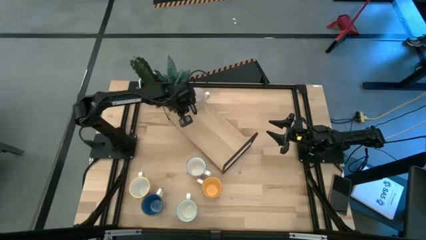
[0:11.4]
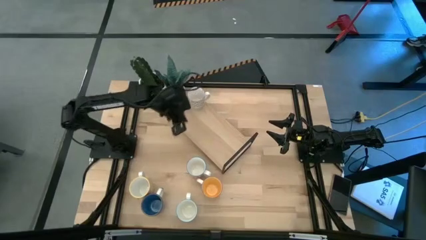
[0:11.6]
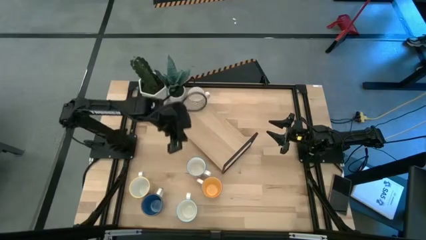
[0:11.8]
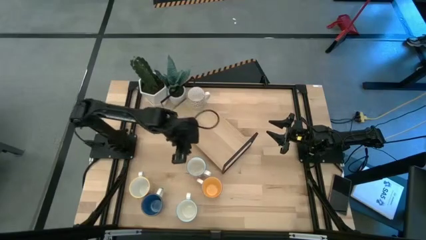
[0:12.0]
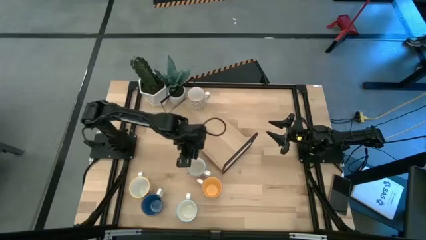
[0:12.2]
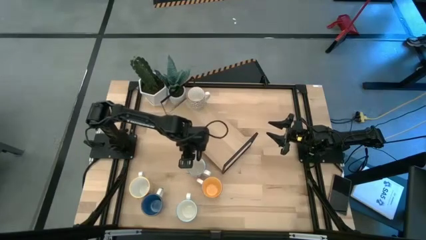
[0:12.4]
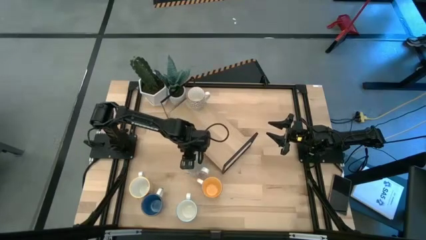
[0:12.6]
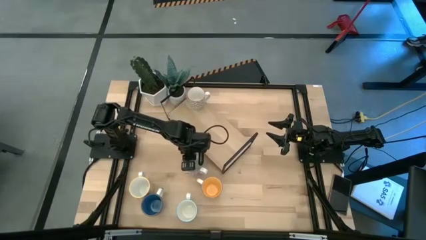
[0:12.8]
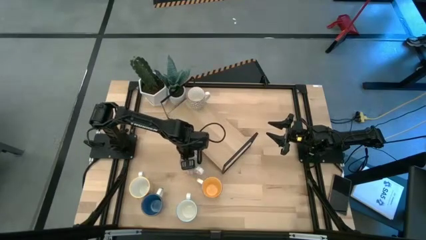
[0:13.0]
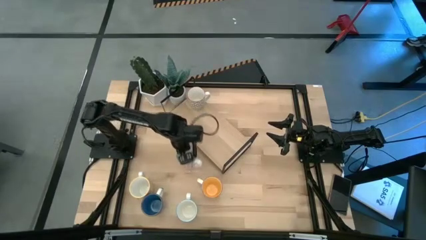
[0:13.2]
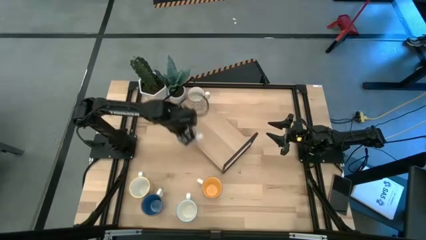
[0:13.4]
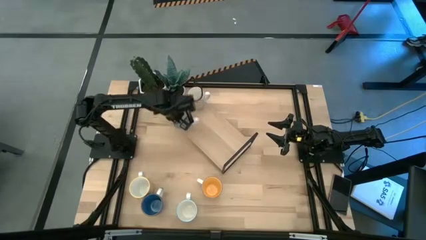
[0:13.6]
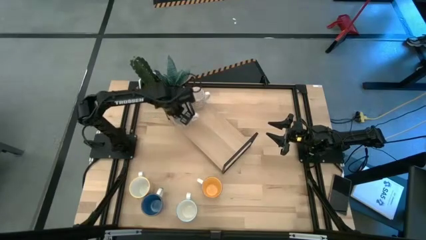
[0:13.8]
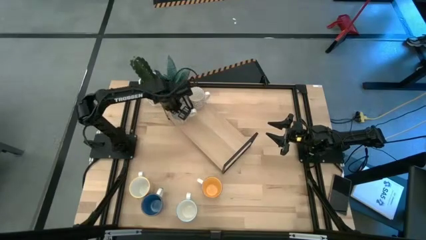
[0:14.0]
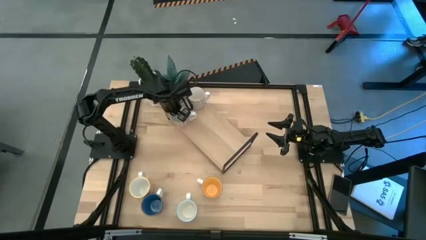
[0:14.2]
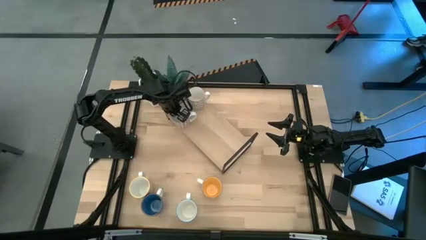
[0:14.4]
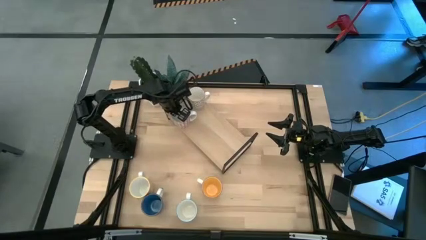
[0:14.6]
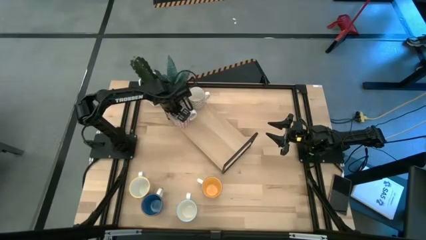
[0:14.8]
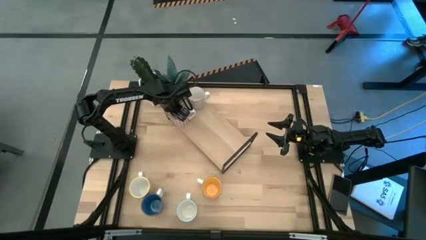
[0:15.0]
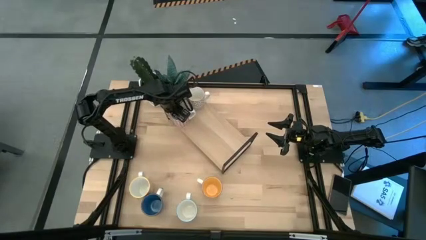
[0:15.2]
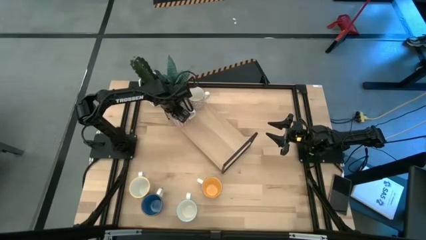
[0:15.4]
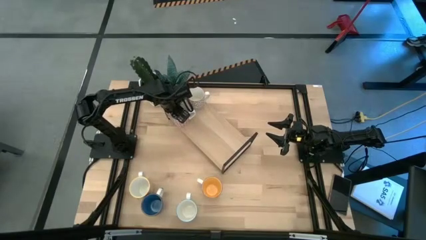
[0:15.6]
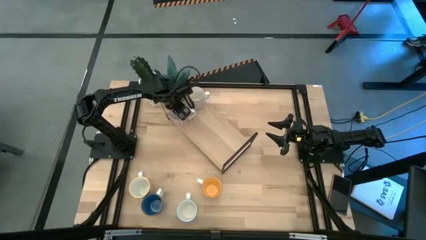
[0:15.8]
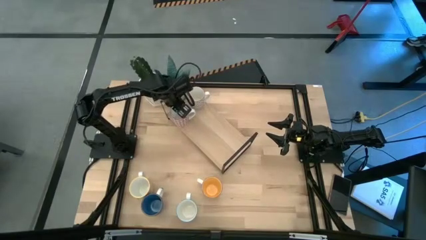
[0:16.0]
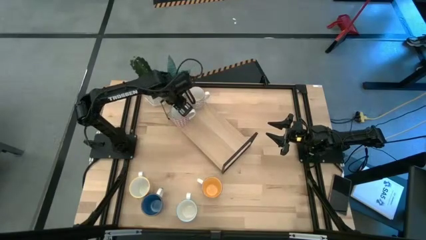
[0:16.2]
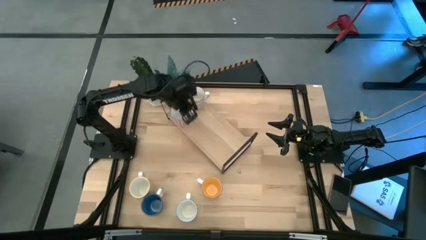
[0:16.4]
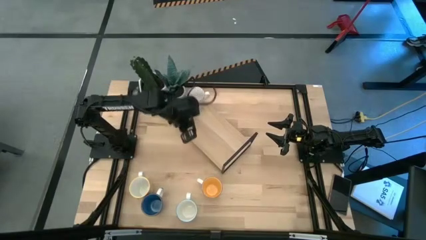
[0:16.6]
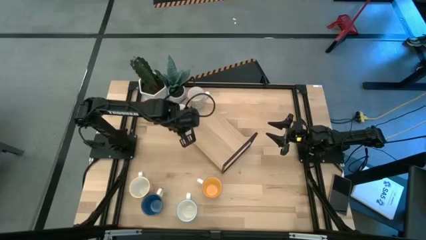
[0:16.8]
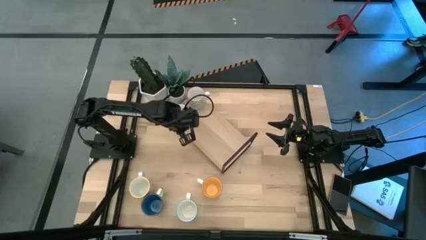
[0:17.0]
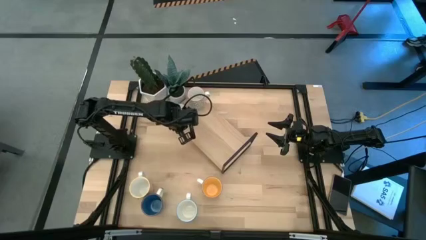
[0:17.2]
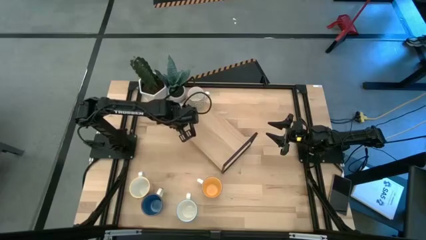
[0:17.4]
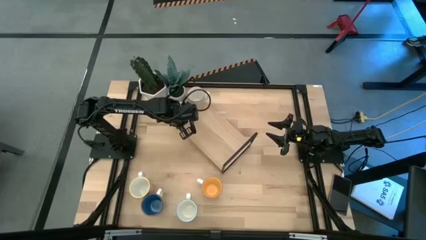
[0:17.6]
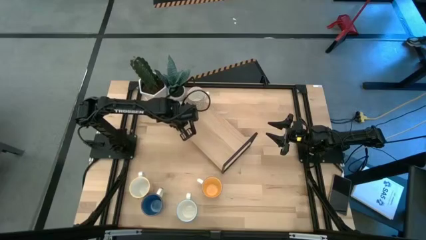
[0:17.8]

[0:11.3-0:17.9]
Task: Place coffee mugs
Put the red mug on the shelf

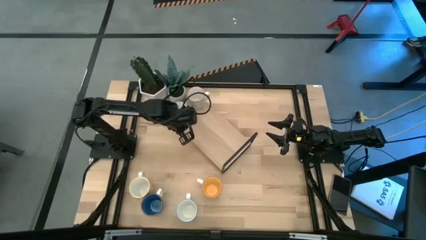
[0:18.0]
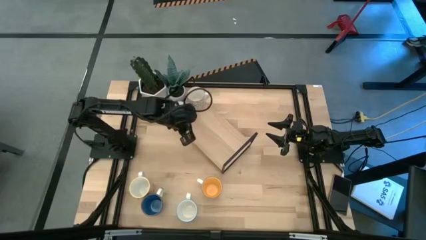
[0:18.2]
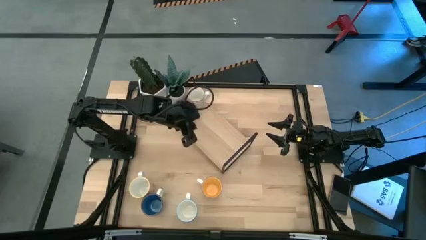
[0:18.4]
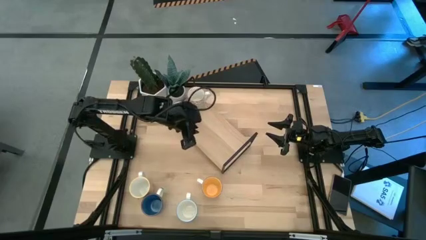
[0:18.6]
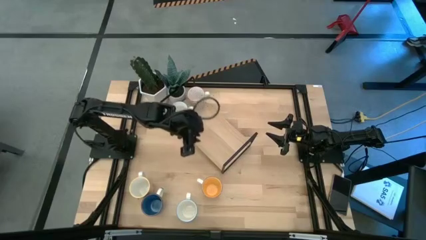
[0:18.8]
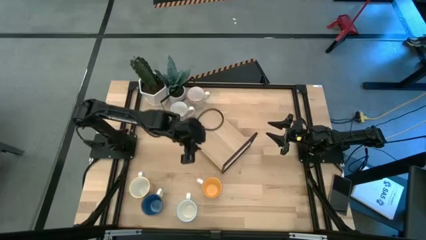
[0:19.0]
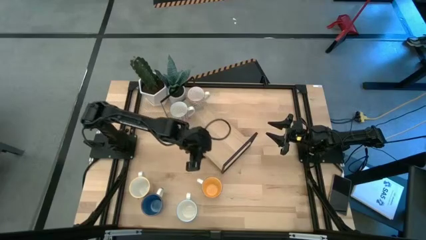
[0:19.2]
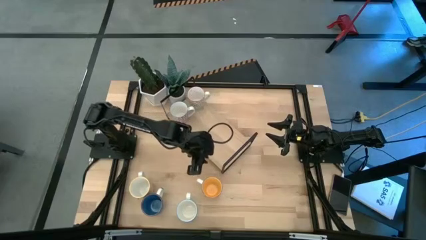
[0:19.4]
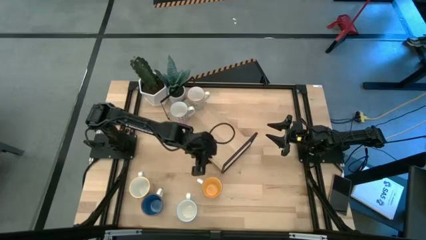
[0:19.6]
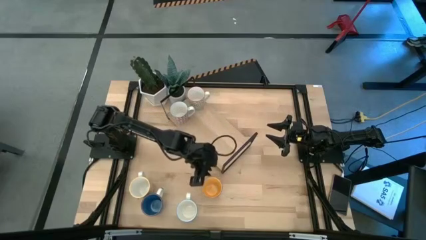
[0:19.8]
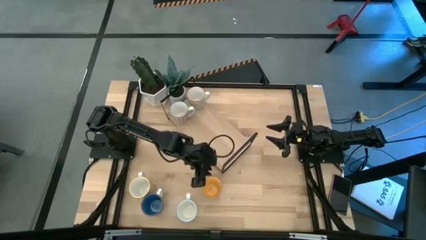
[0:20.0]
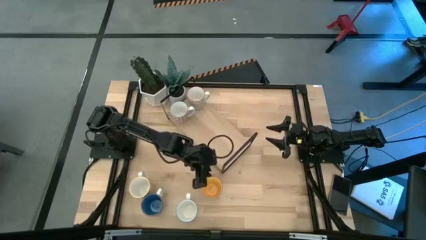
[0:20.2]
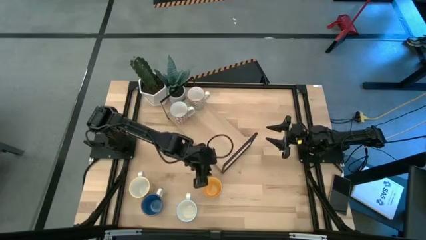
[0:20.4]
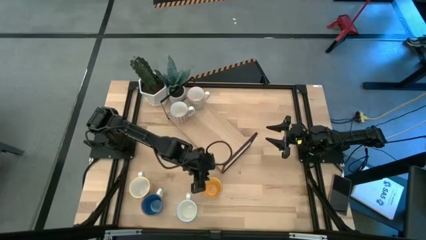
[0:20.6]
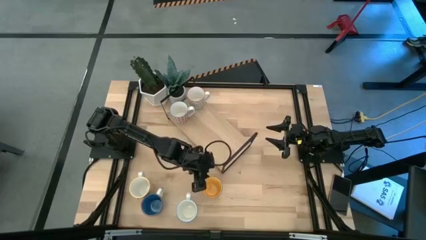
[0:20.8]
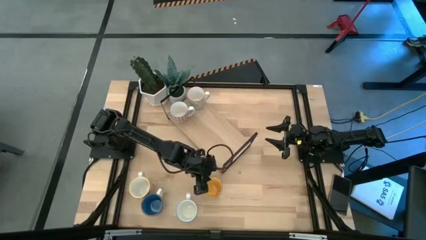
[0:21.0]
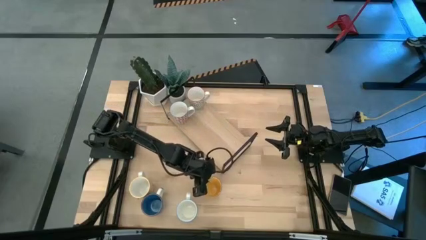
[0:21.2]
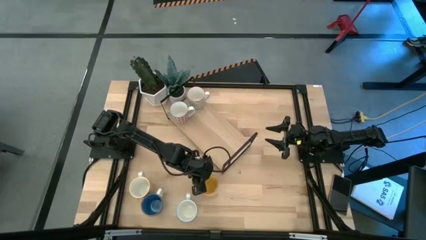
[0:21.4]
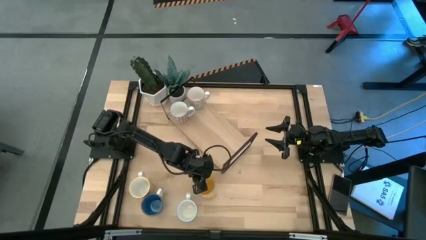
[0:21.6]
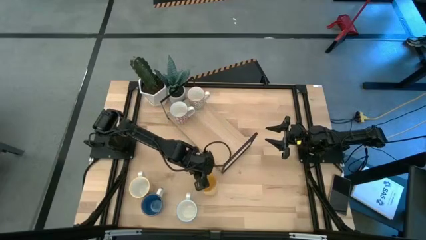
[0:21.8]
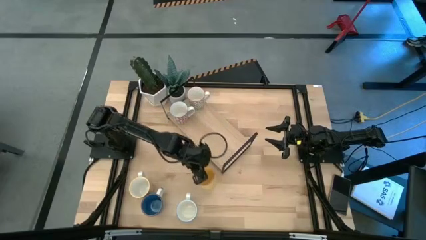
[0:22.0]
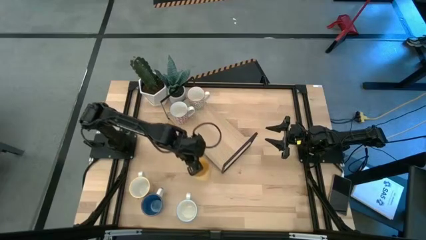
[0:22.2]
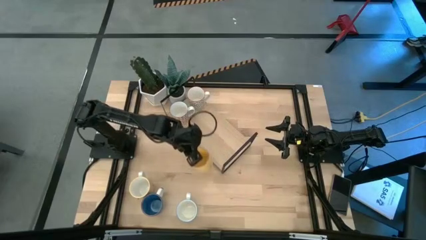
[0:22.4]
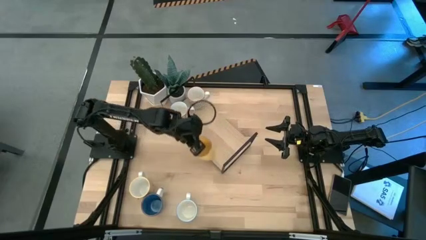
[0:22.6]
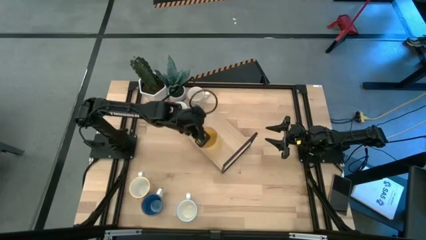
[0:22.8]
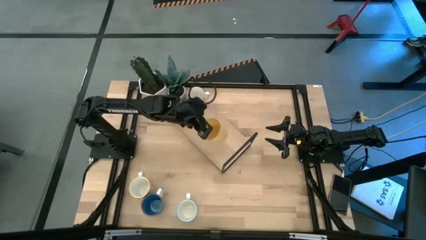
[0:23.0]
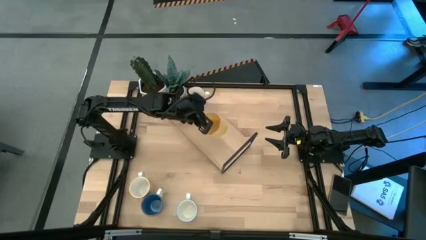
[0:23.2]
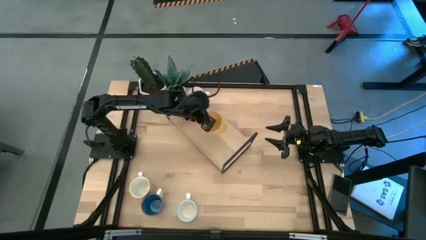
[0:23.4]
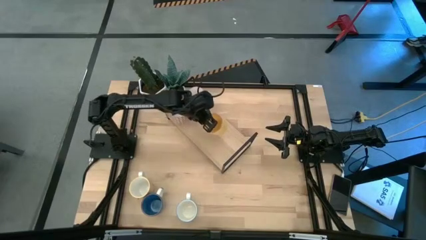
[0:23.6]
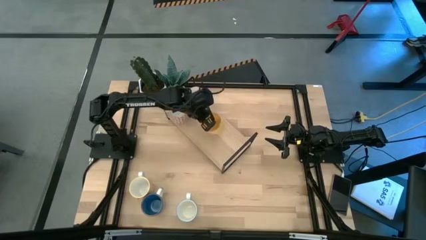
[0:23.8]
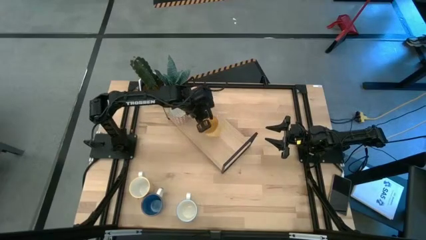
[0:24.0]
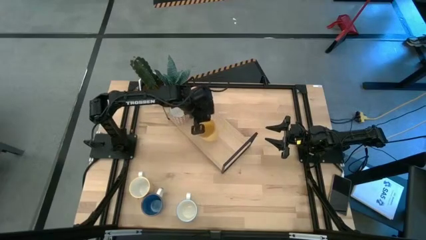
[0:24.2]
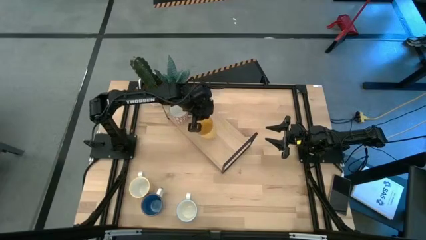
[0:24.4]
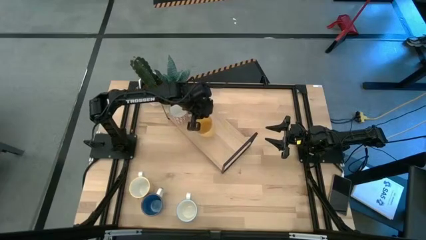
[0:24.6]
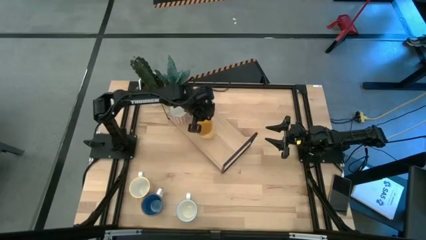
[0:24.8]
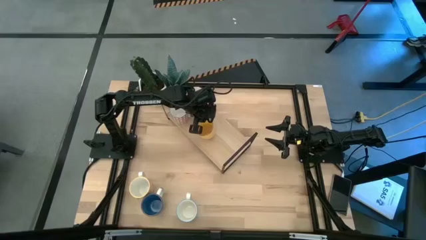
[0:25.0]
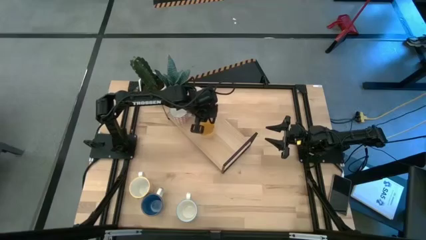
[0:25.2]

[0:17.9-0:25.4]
Put the yellow mug on the shelf

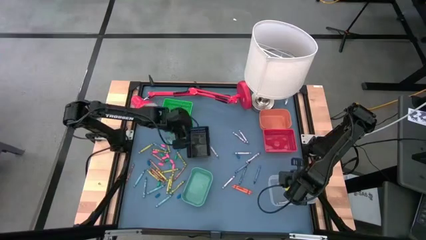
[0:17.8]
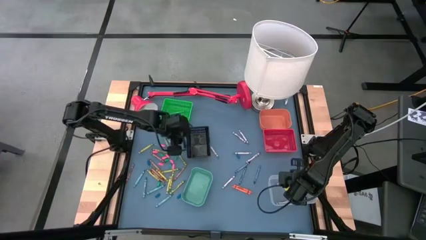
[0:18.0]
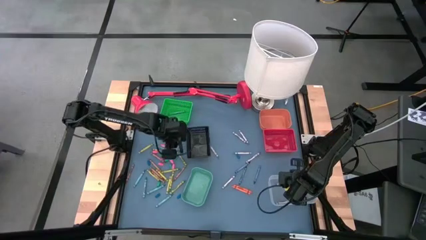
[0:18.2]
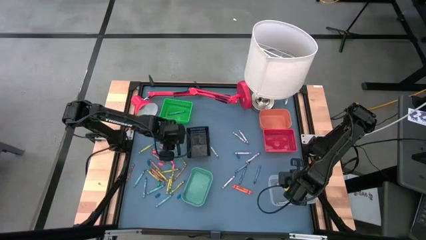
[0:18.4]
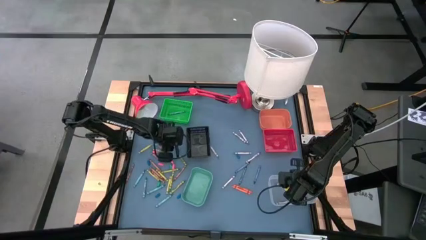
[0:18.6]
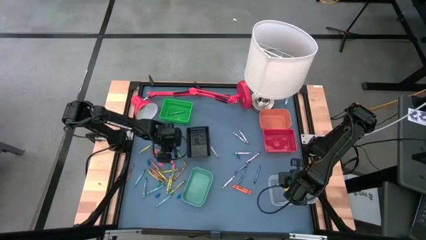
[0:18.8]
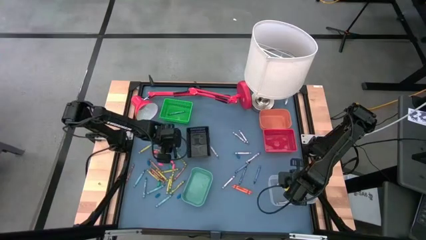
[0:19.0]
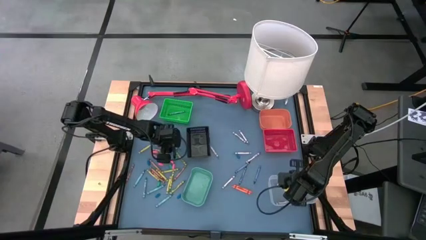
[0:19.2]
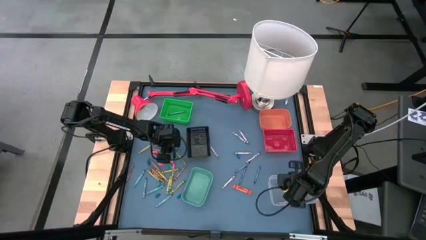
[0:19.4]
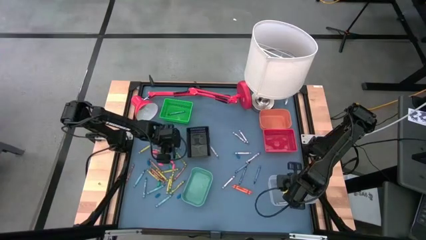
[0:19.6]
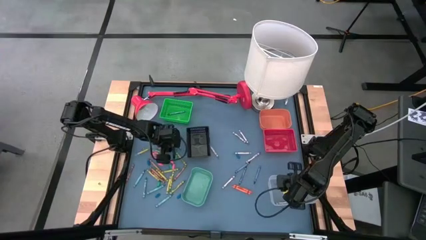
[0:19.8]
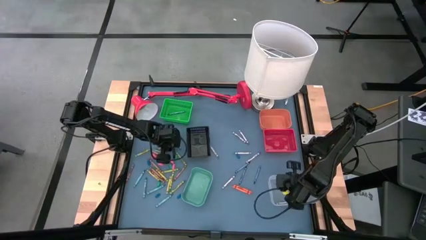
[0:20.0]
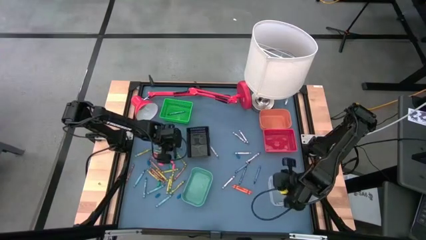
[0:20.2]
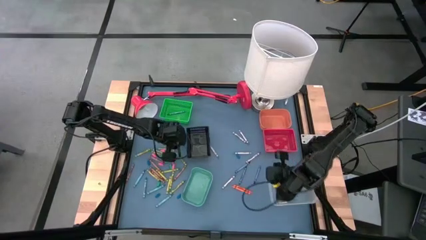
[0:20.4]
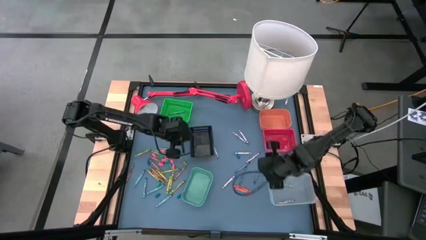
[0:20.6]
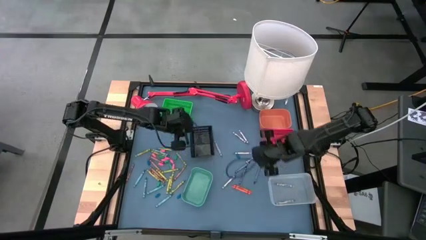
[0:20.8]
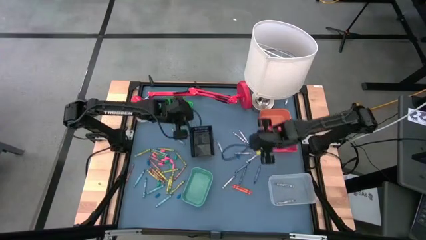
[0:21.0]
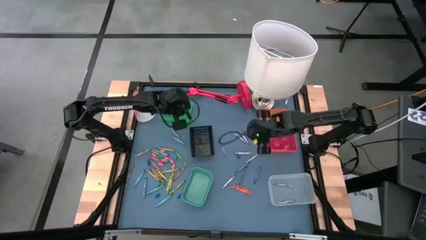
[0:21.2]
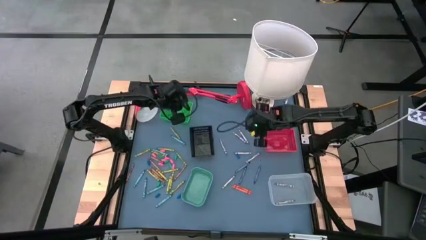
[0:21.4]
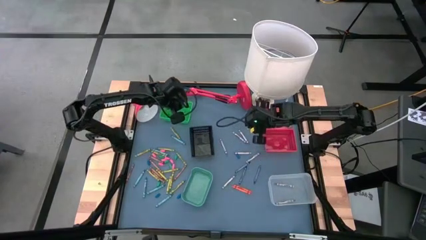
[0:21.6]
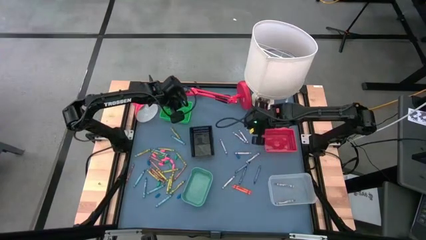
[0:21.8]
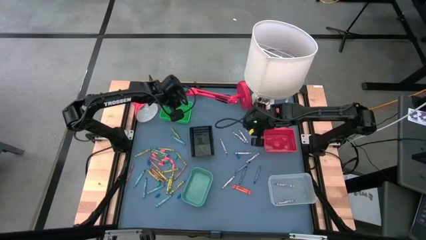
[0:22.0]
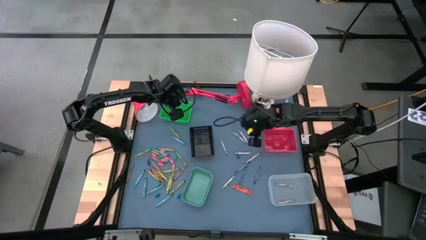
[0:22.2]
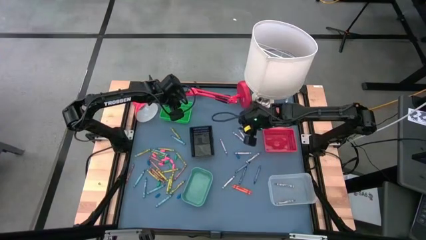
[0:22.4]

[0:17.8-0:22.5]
Task: Sort crayons
Put the blue green crayon into the green bin
